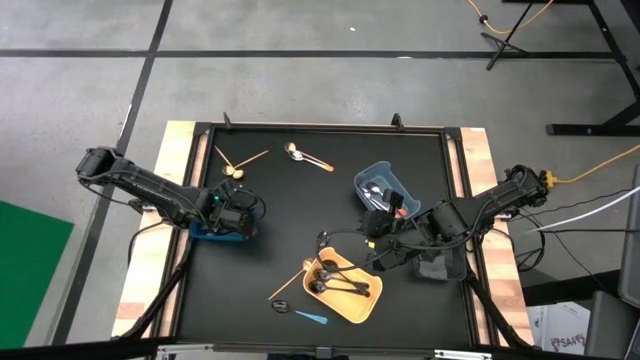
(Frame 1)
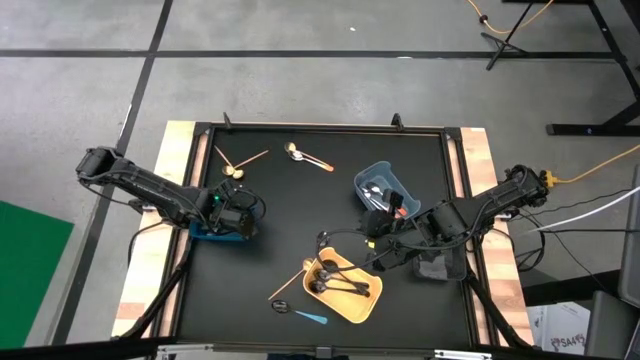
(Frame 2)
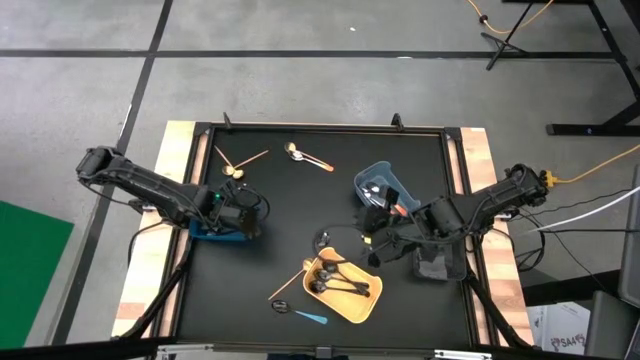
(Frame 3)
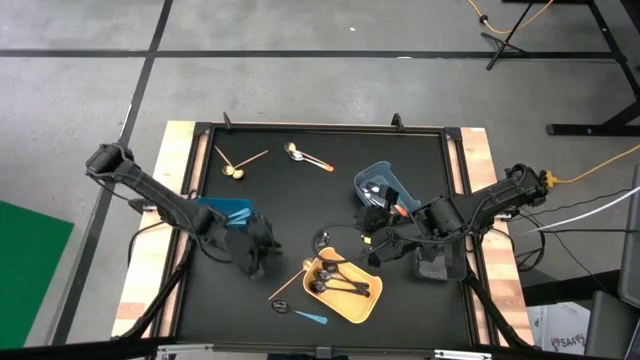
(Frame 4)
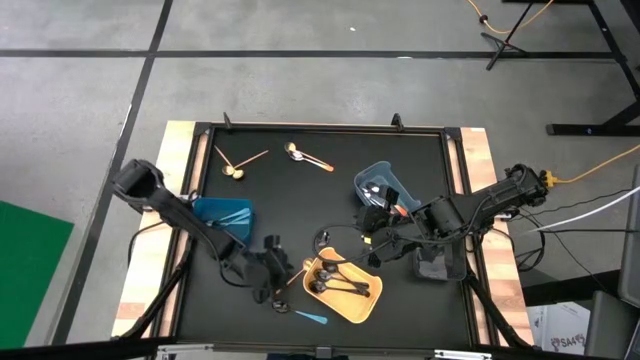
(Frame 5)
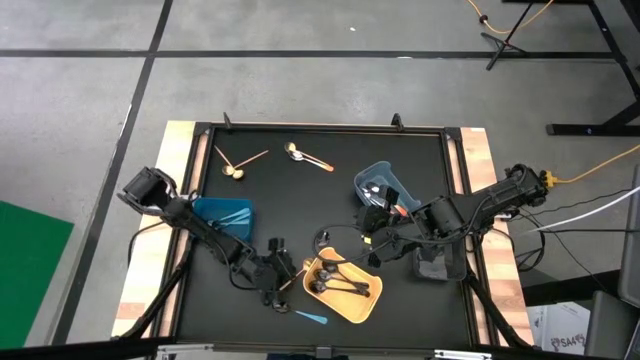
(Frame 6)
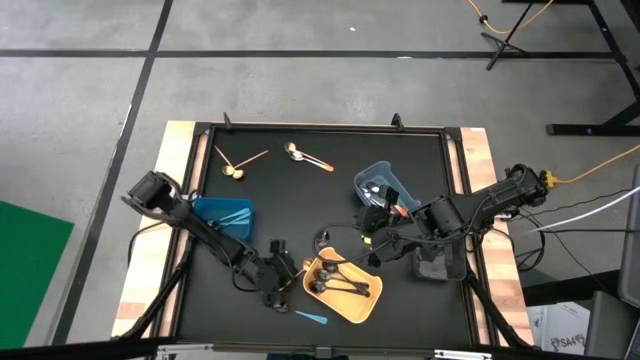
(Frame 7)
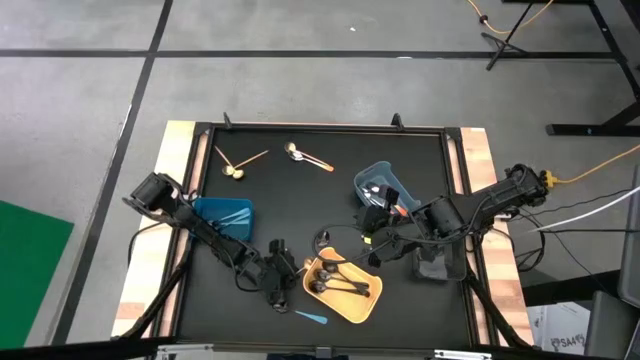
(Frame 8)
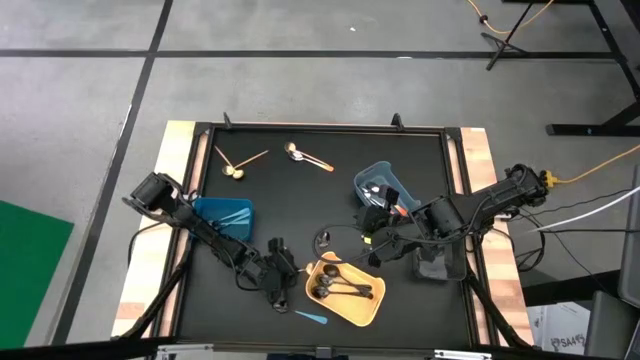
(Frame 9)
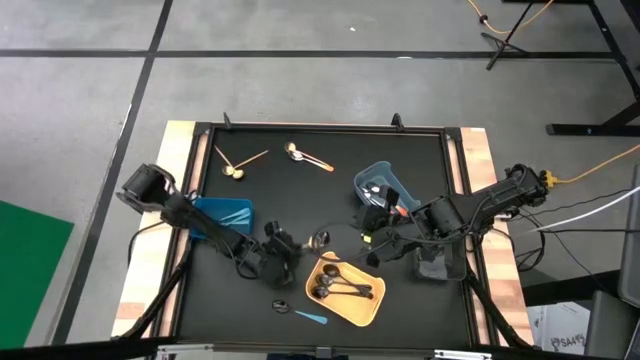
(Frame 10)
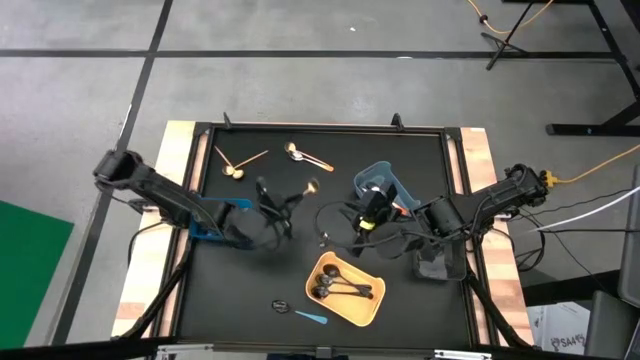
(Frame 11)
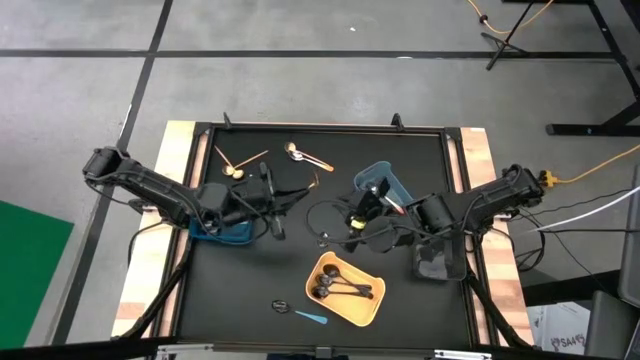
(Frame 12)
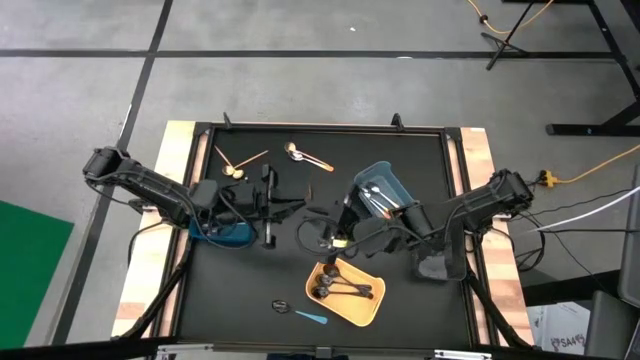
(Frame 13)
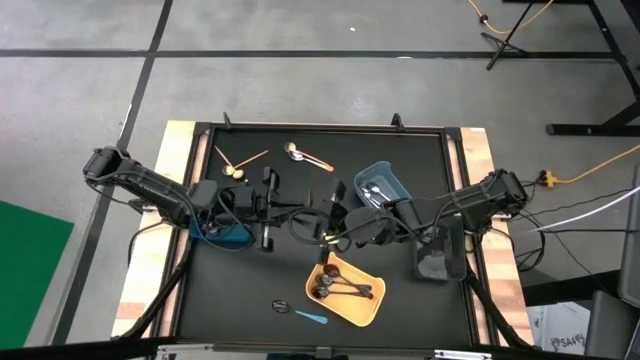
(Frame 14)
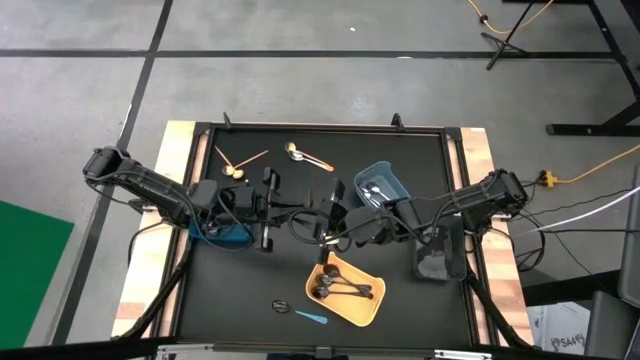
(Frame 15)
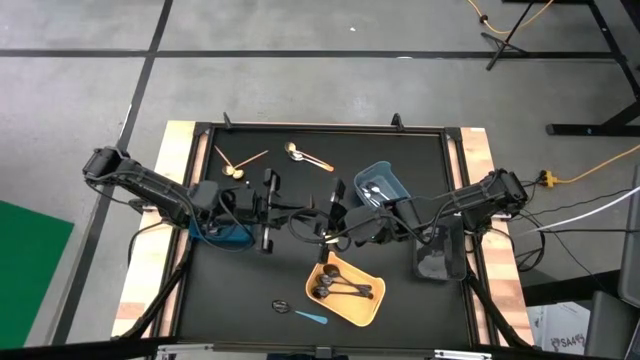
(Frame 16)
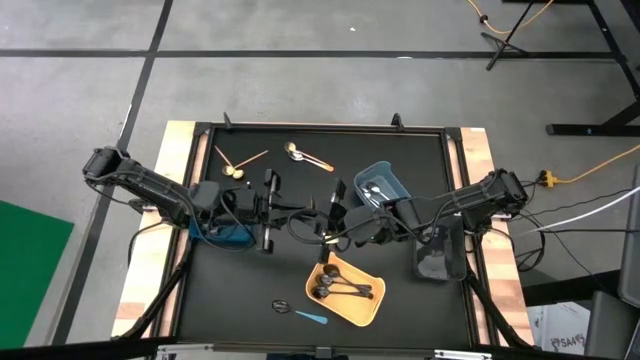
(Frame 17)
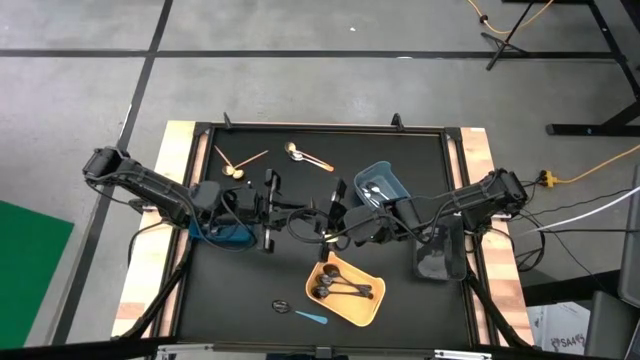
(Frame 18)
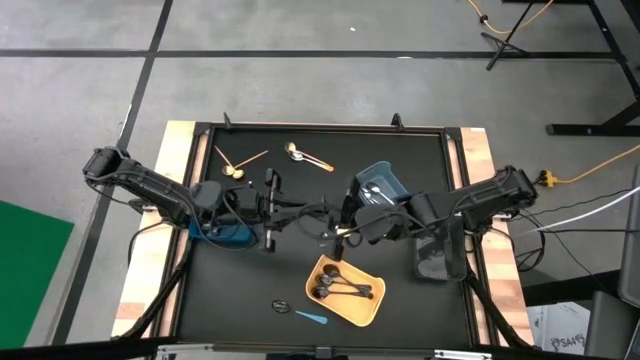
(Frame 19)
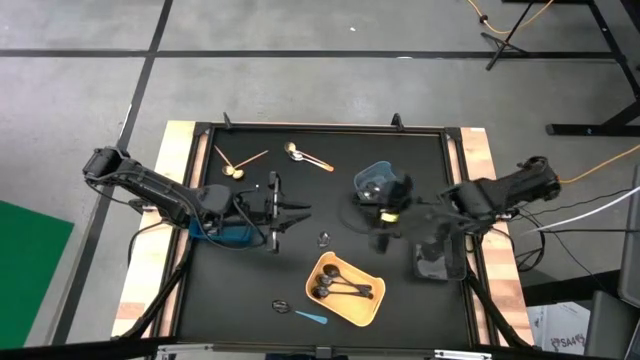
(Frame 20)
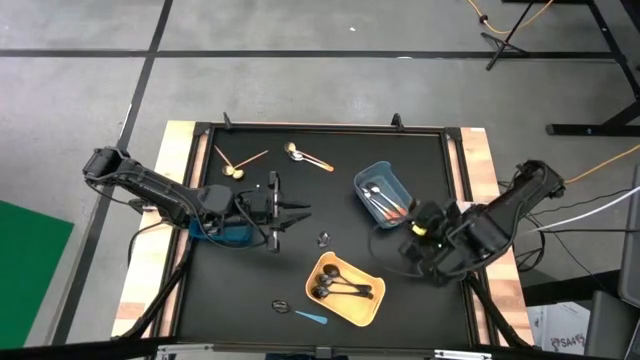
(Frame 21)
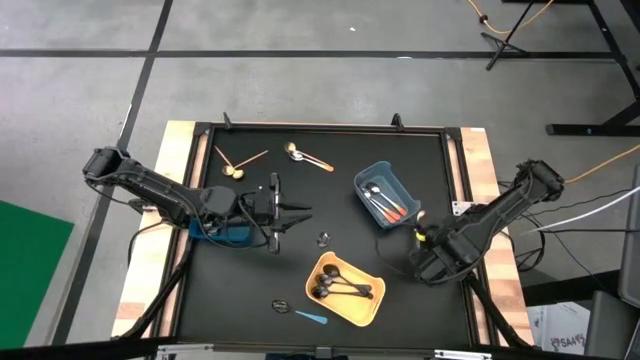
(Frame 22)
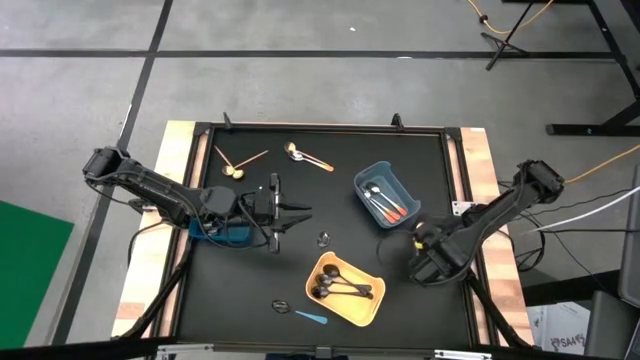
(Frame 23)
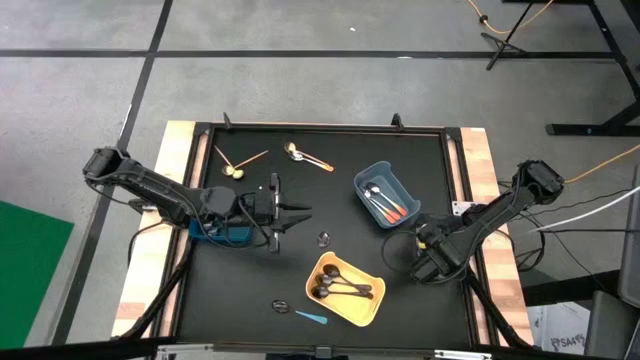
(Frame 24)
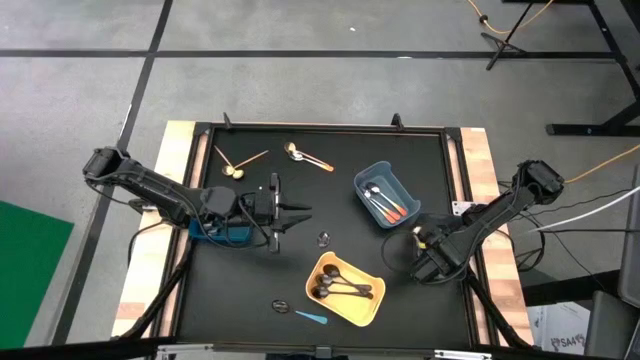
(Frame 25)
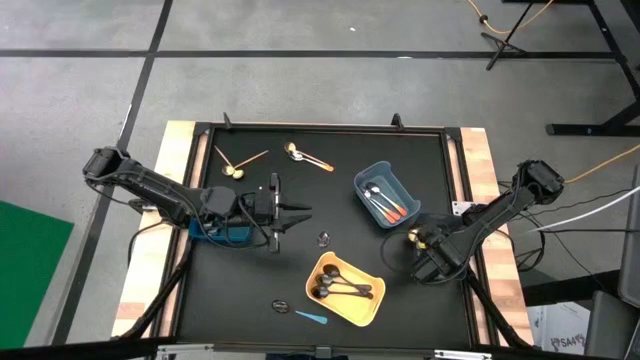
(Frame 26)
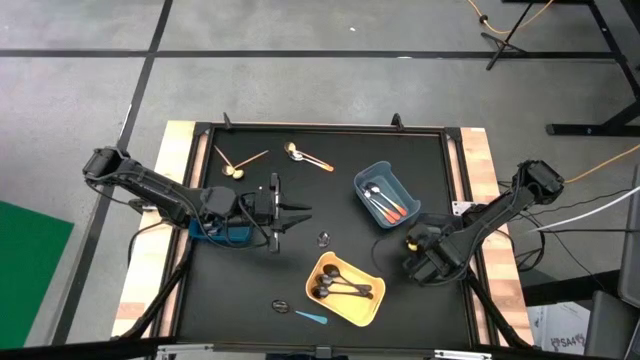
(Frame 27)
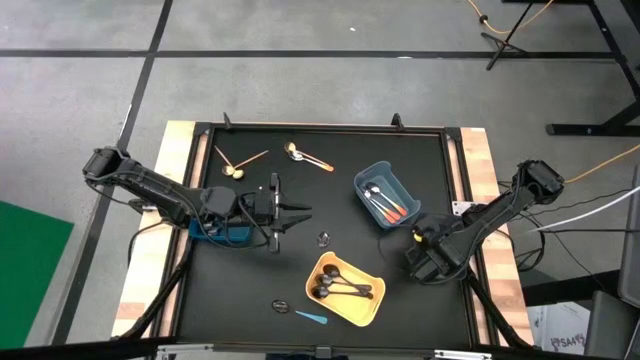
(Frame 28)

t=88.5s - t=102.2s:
Task: Sort silverware by color (type)
Put the gold spoon into the black bin

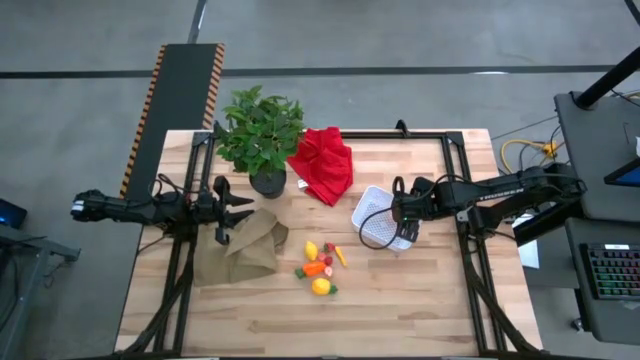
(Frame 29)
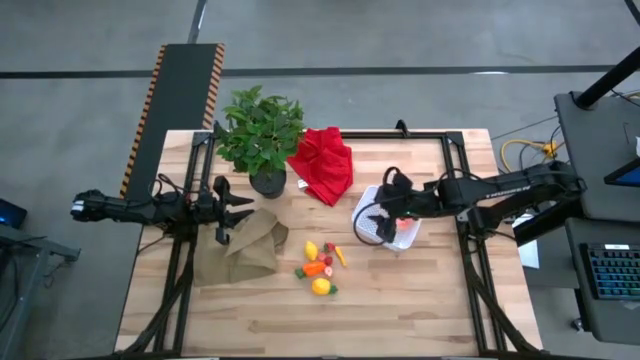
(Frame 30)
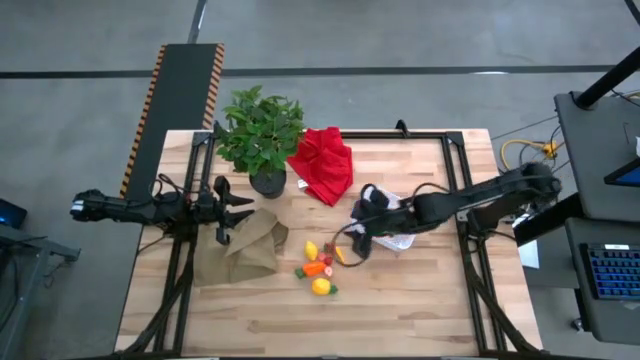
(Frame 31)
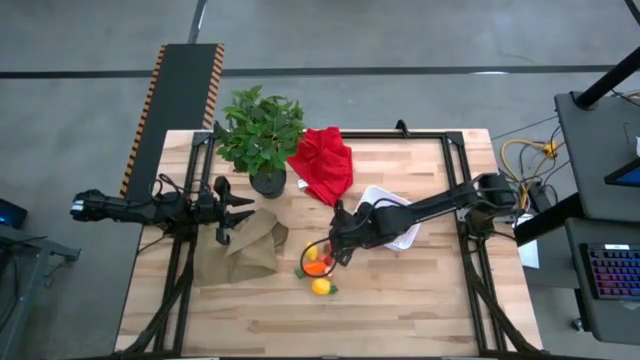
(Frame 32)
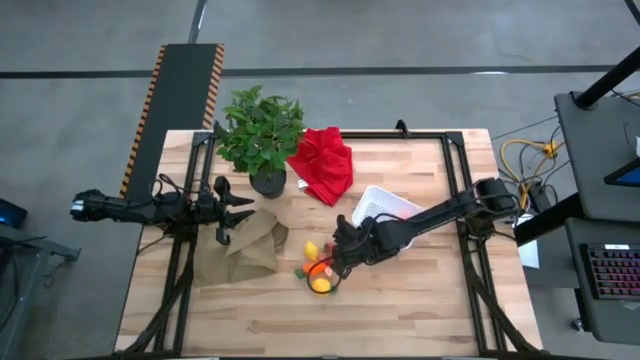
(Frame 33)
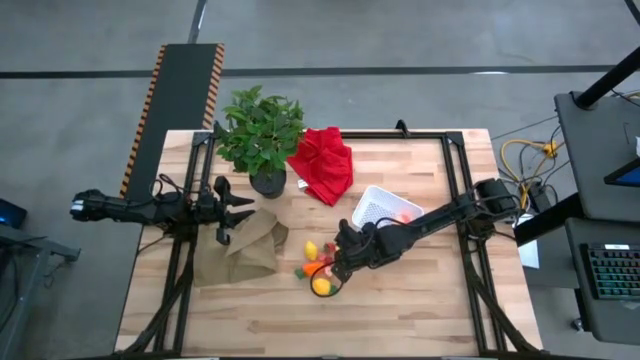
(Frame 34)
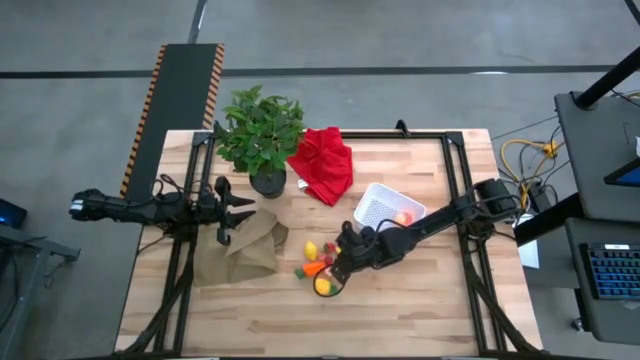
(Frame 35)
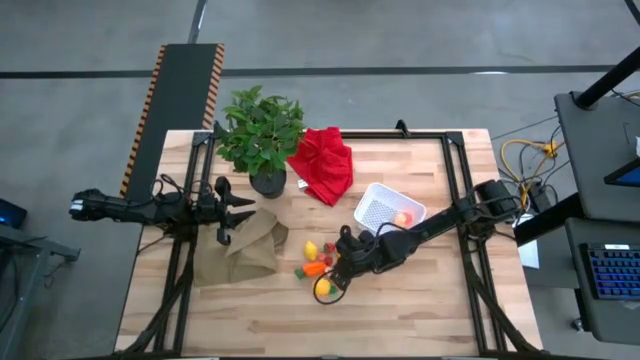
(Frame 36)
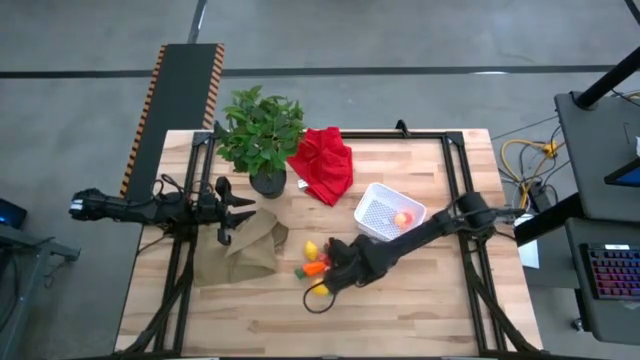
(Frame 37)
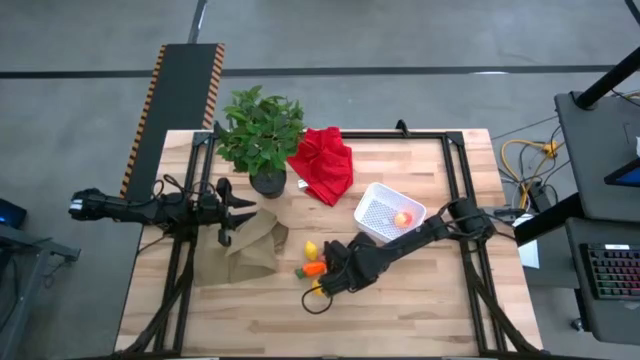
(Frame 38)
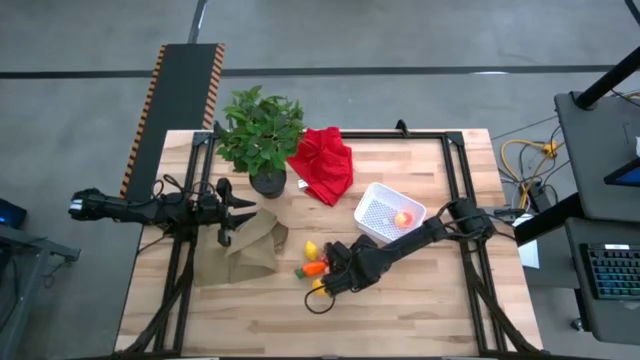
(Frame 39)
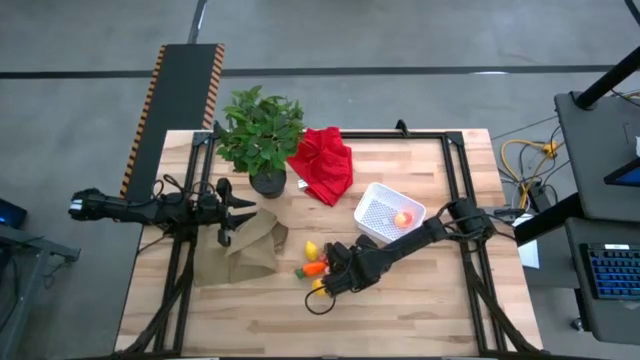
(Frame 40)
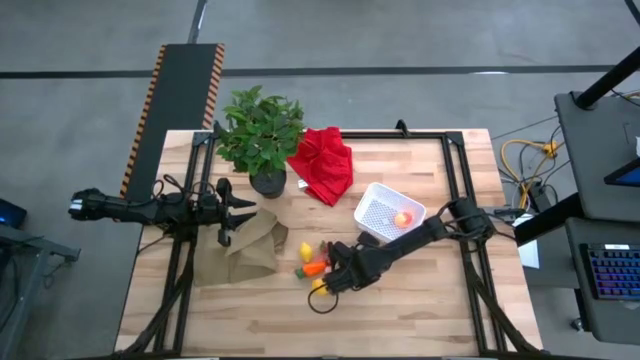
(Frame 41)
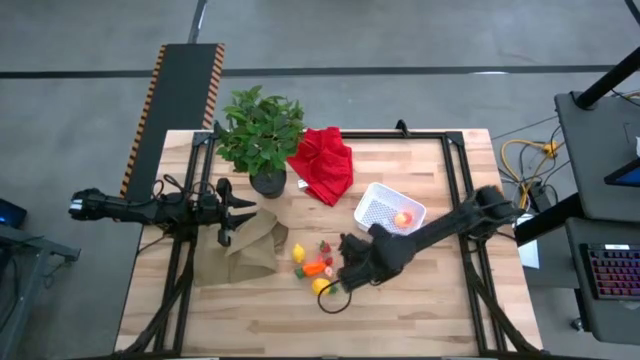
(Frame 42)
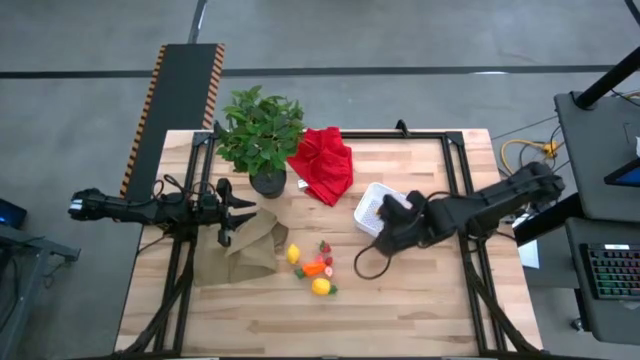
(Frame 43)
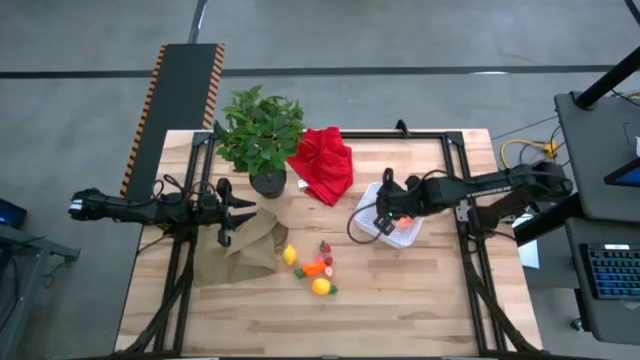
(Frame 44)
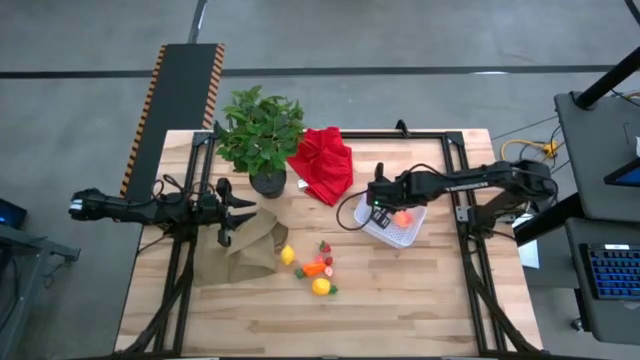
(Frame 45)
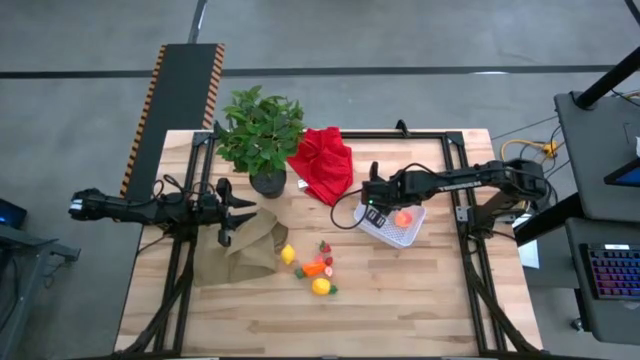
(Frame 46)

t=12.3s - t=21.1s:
Task: Pick and placing Produce into tupperware
Put the yellow corn into the white bin
